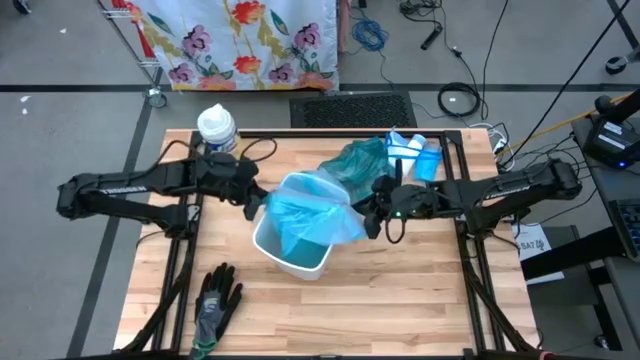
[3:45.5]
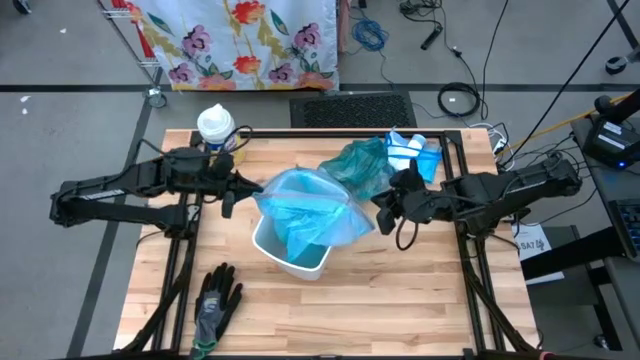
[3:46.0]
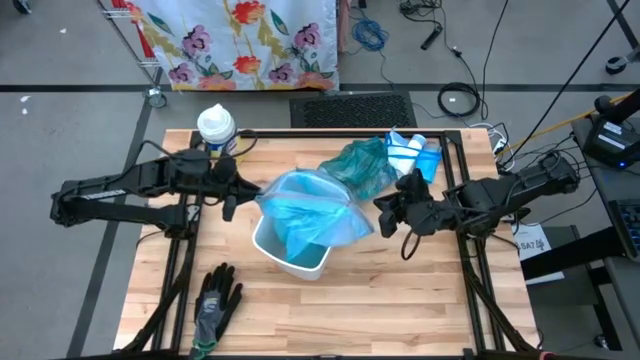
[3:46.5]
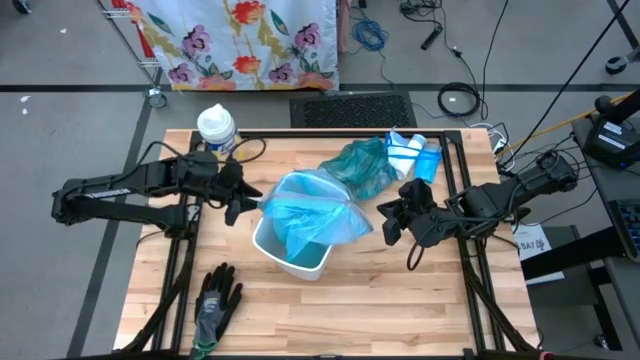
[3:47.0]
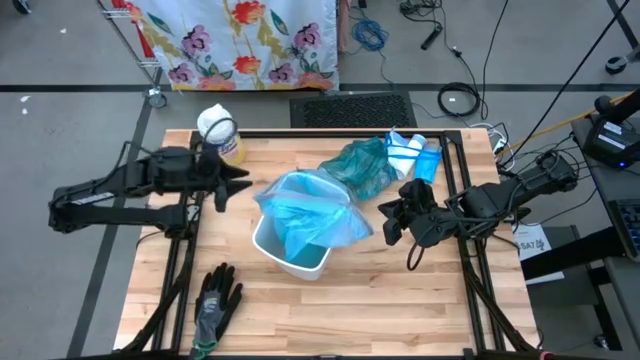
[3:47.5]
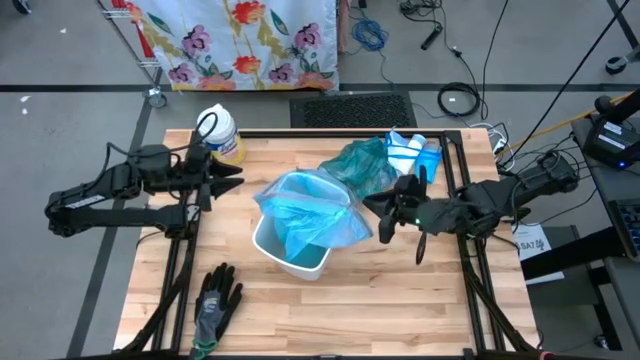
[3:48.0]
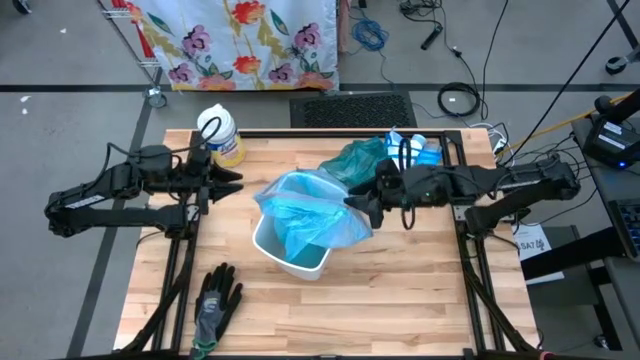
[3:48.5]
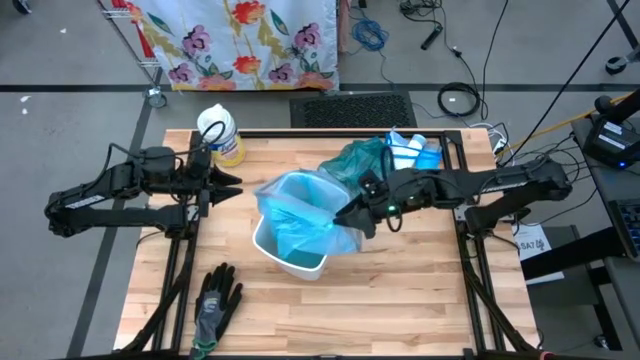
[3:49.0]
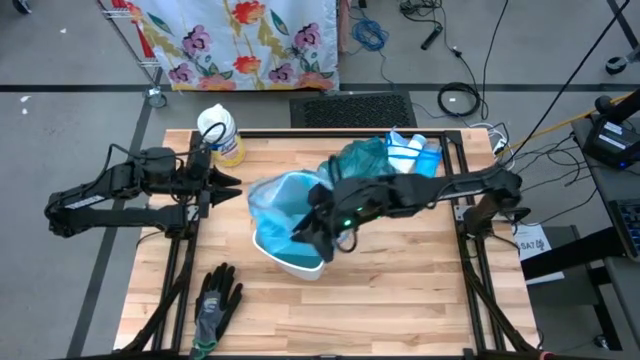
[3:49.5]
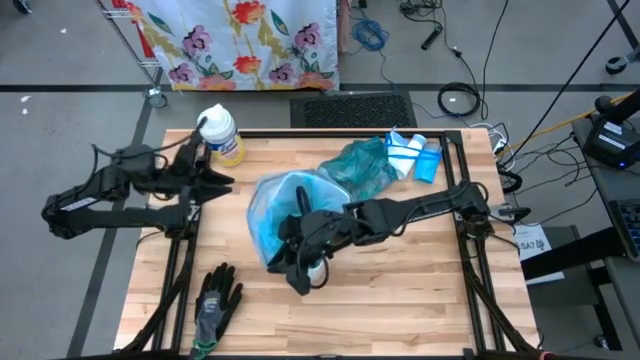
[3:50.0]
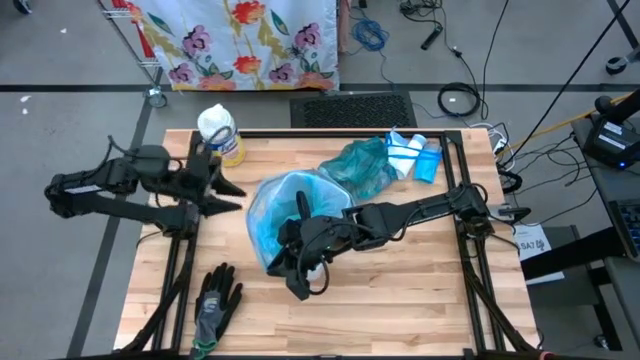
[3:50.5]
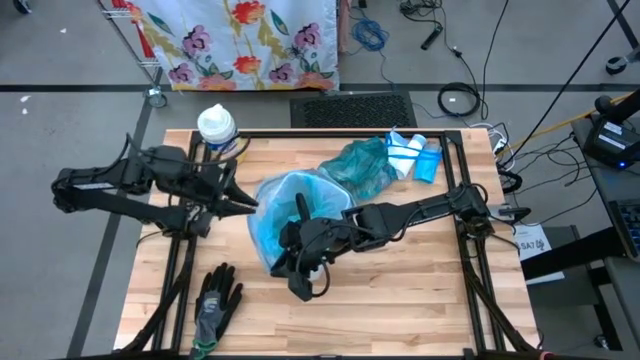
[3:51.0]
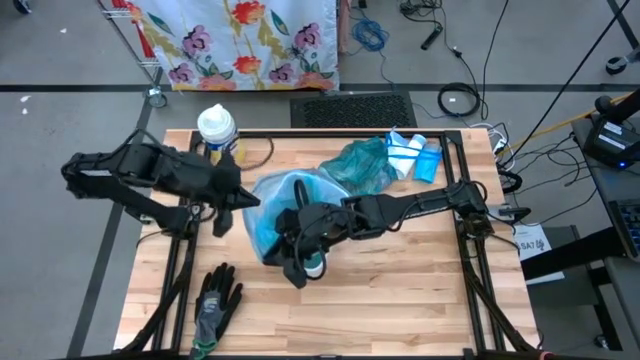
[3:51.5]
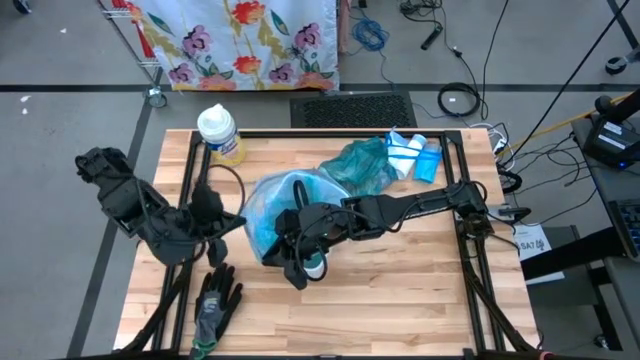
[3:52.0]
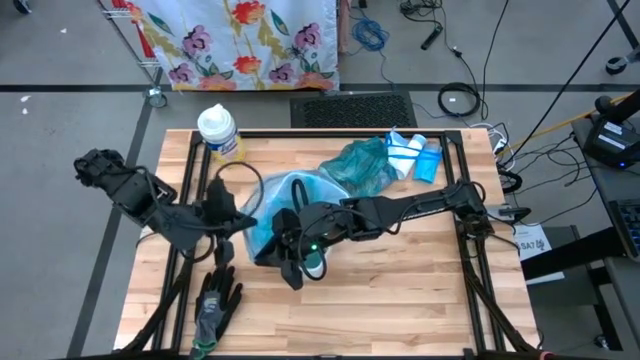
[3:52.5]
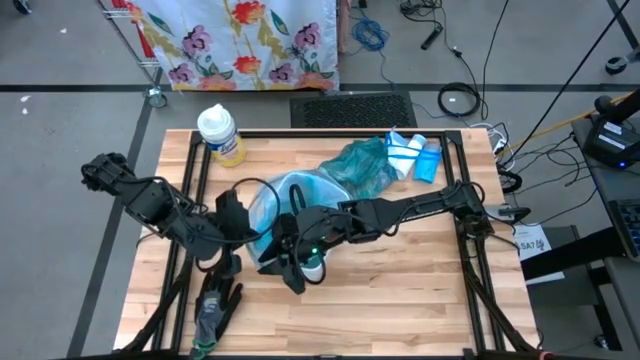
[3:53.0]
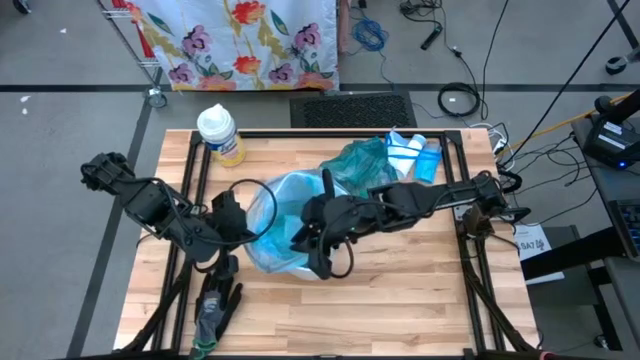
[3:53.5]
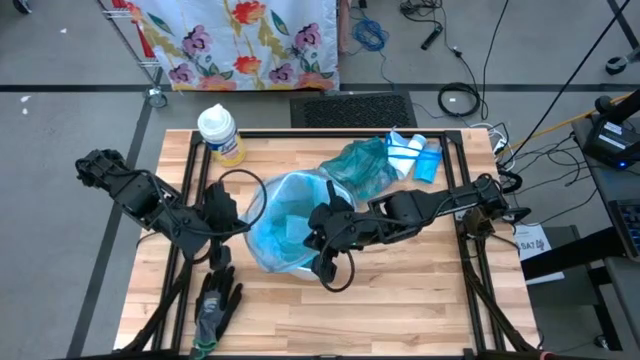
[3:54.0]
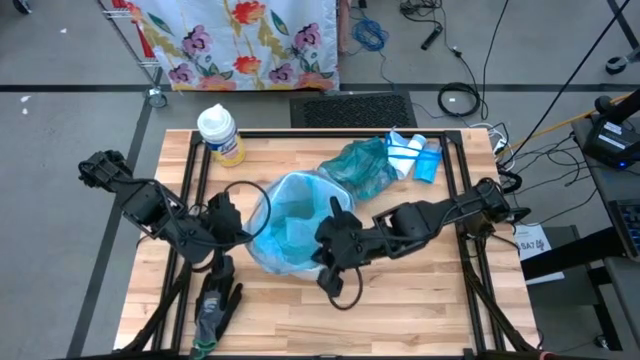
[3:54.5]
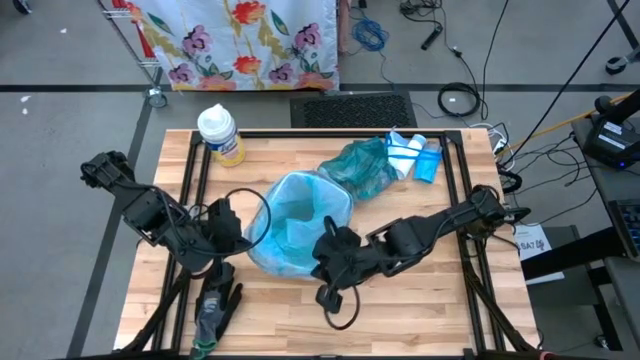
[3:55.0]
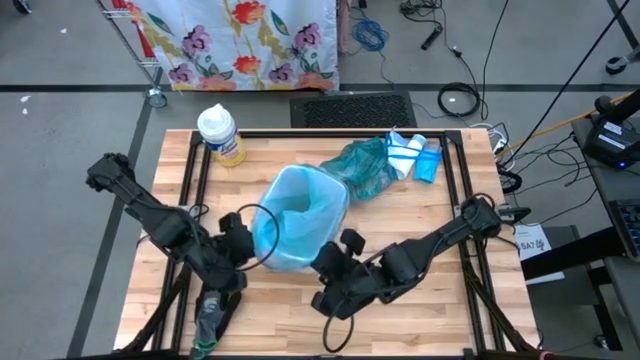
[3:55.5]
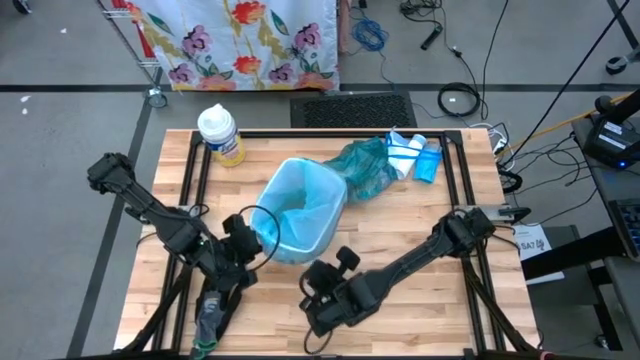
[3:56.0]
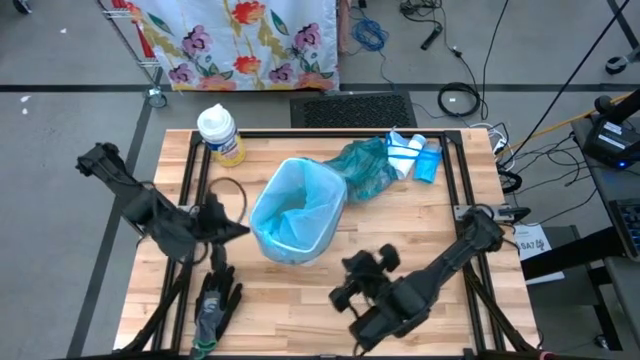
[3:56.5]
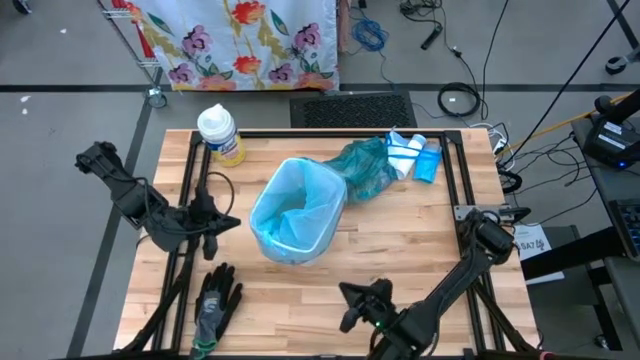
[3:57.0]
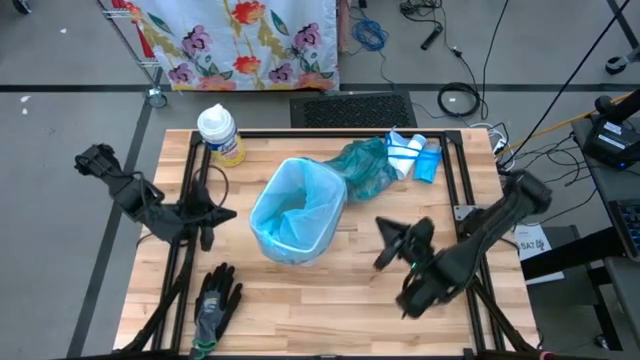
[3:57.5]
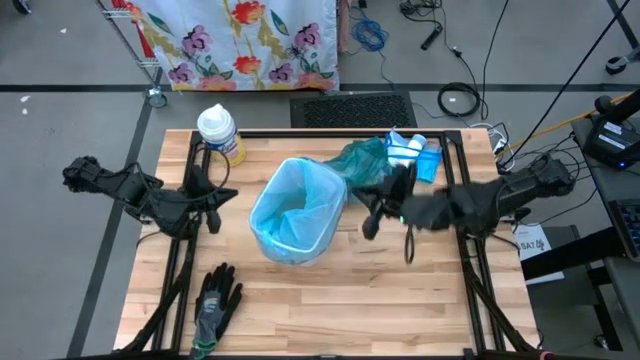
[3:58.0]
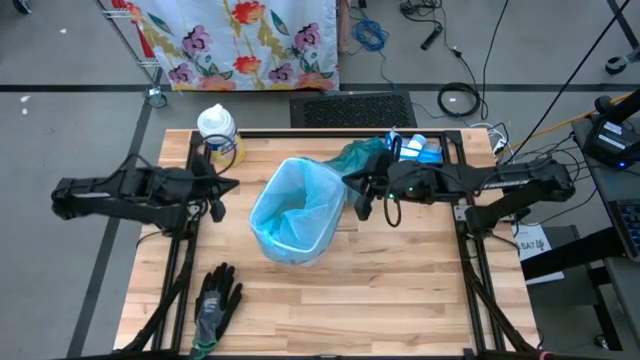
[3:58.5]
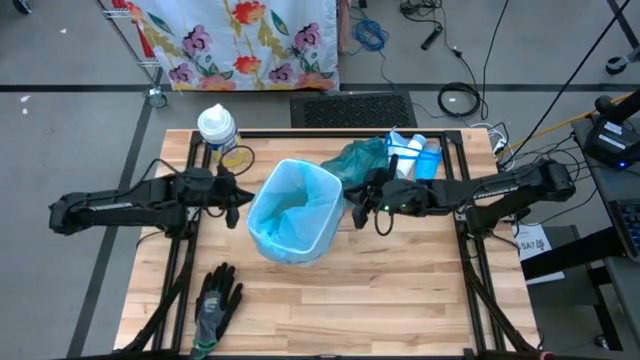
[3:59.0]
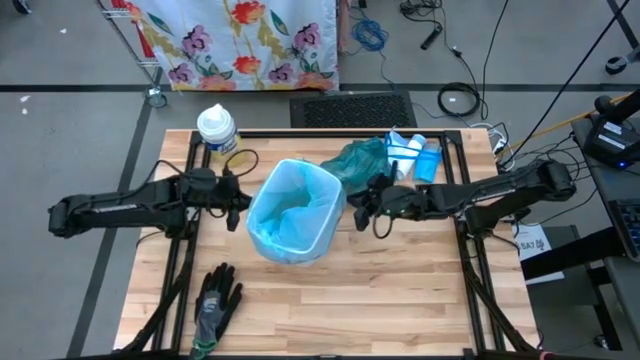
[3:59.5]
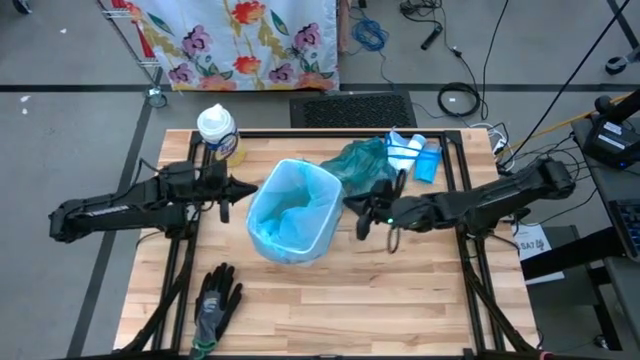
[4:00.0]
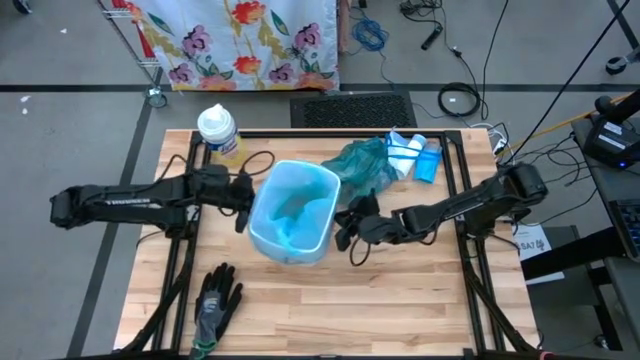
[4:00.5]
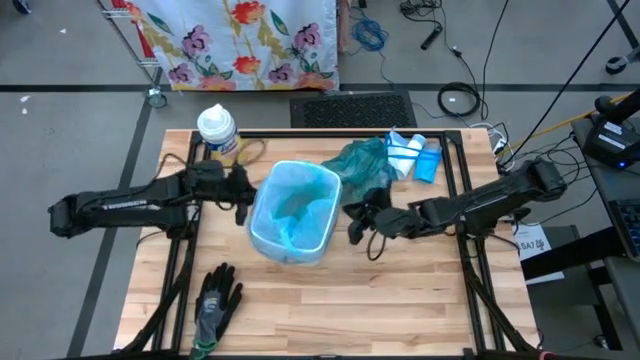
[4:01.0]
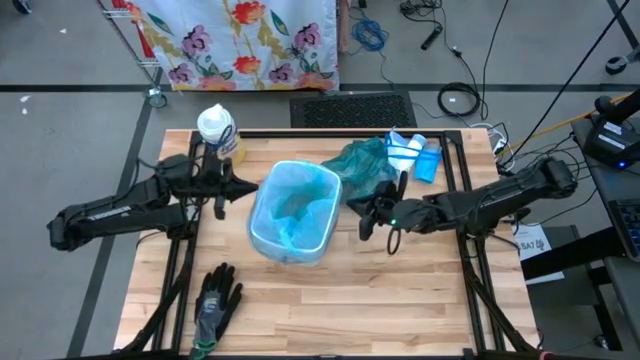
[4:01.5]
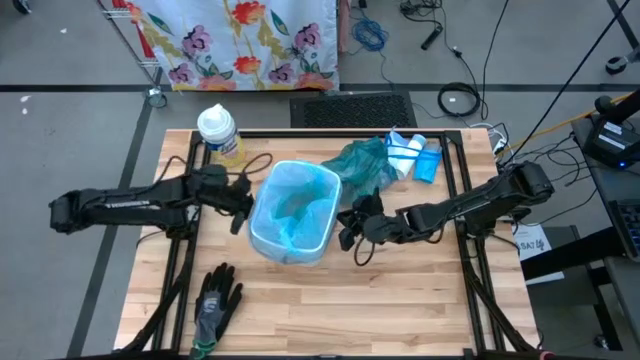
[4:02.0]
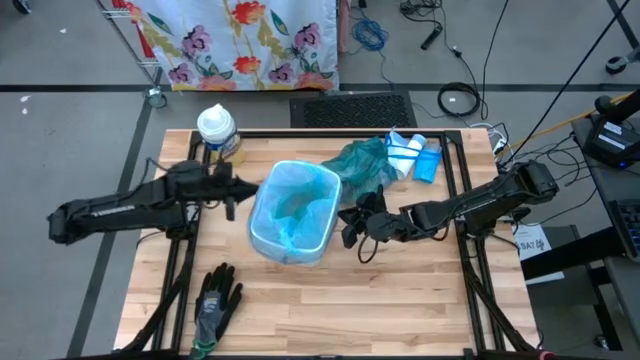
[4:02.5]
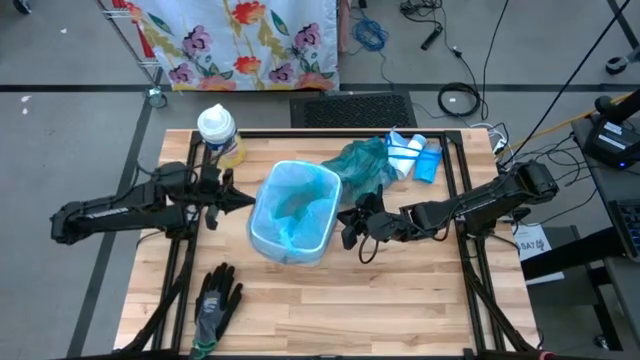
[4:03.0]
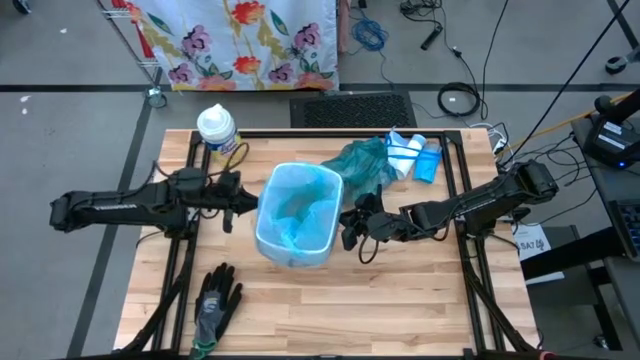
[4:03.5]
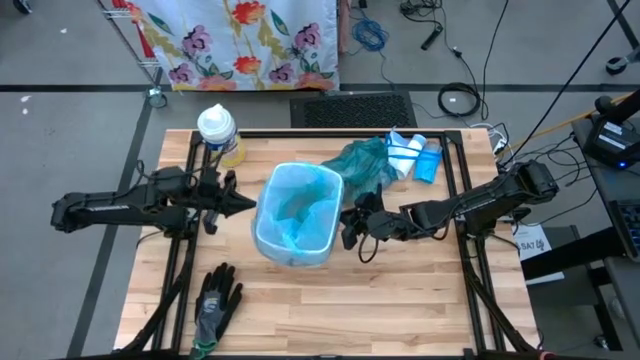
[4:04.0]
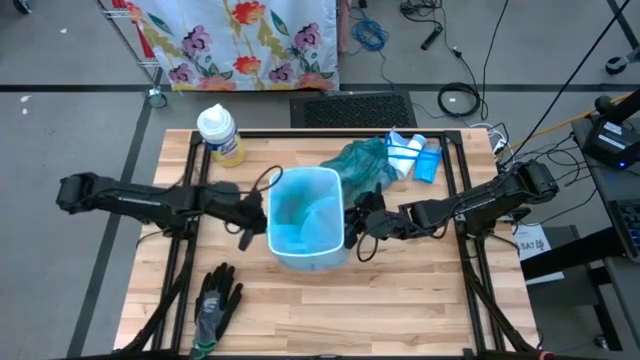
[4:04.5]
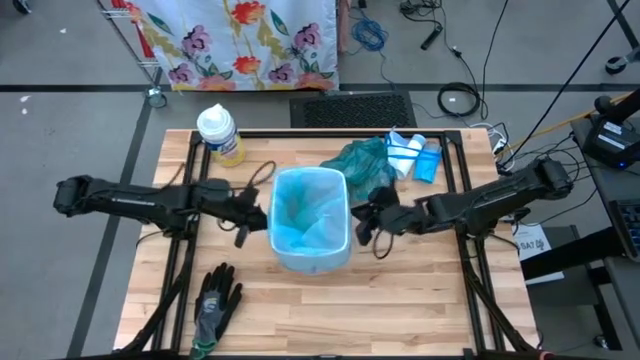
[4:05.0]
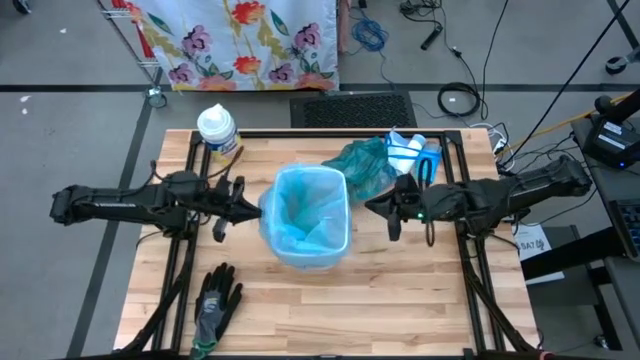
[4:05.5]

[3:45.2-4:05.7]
Task: place trash/remove bag and relplace
Insert the light blue trash bag into the white trash bin

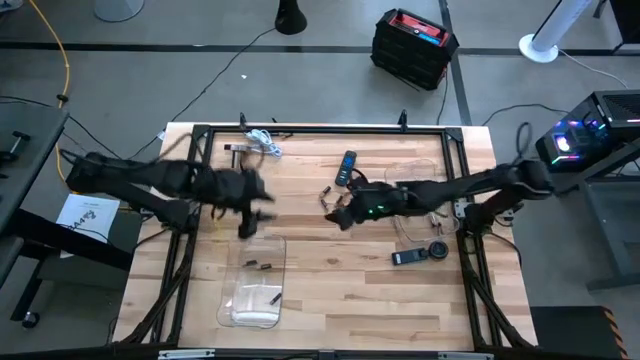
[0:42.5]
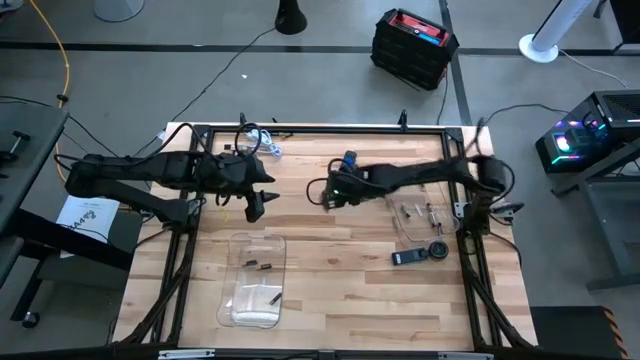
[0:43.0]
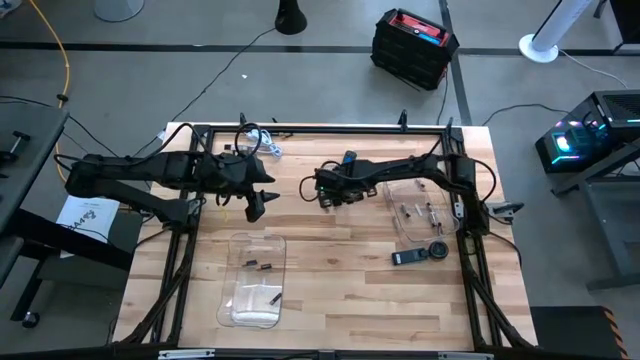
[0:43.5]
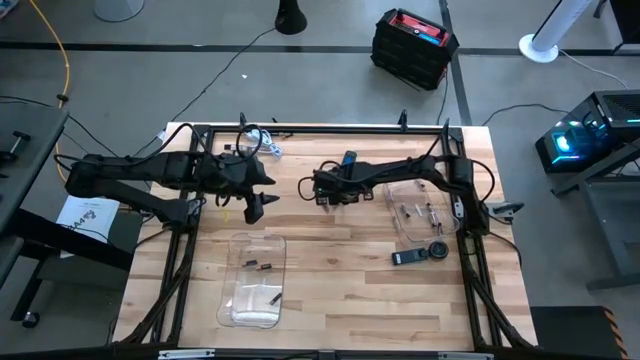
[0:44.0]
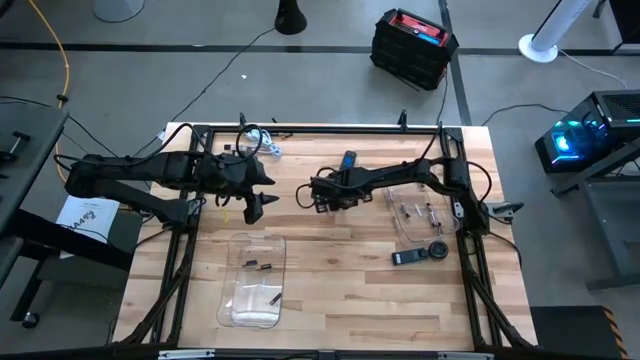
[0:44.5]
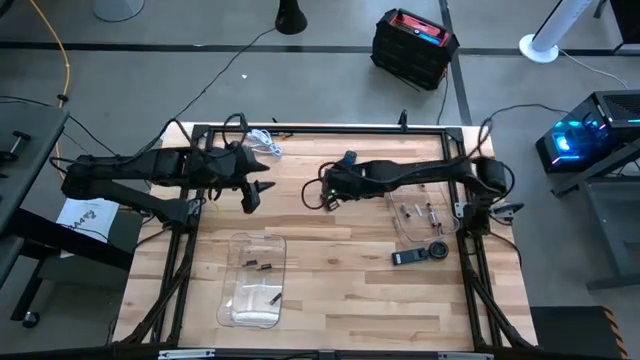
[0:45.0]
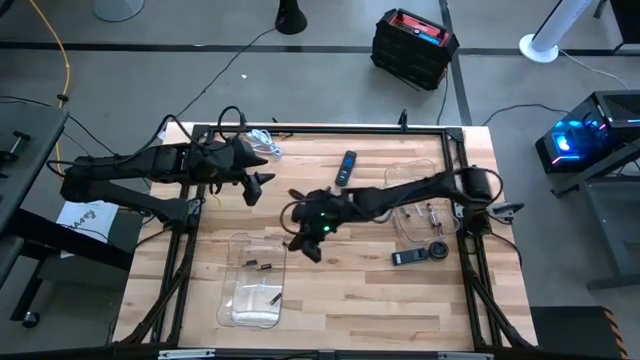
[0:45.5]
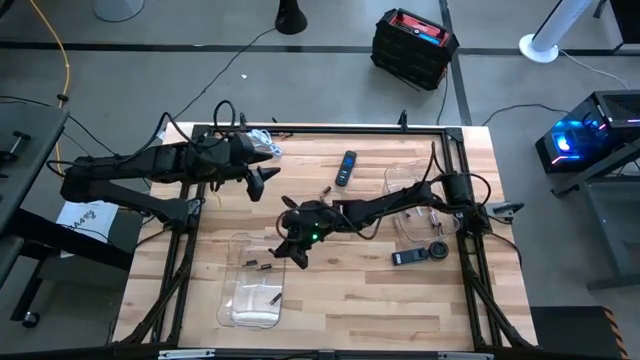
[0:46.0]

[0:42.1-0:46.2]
Task: Sort batteries
Put the black battery into the left transparent bin
